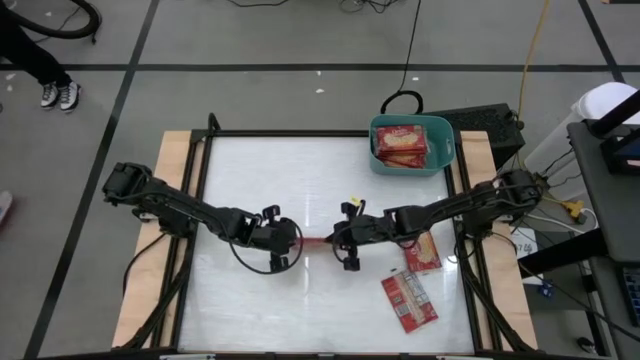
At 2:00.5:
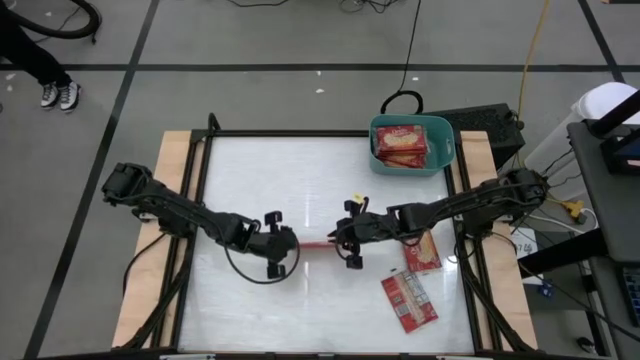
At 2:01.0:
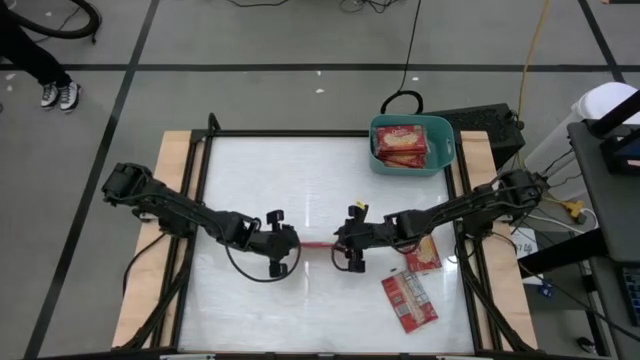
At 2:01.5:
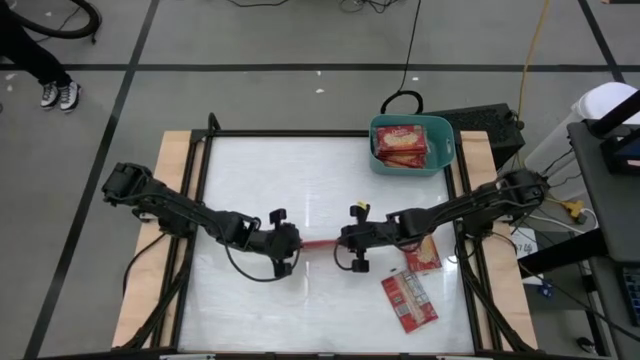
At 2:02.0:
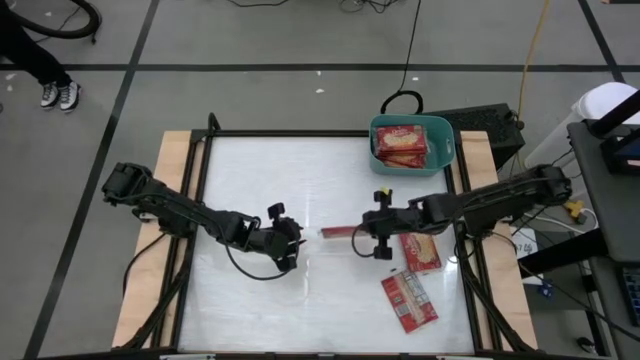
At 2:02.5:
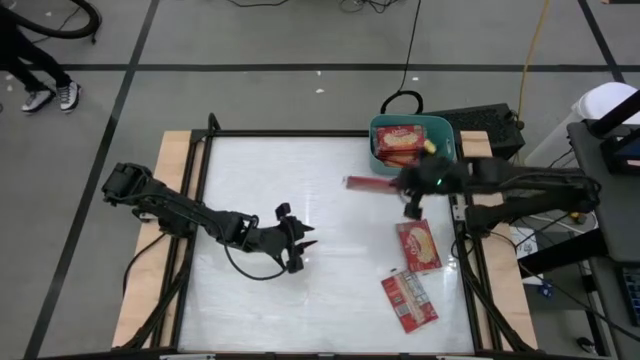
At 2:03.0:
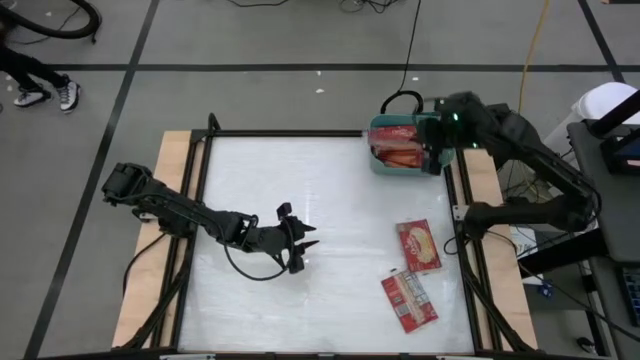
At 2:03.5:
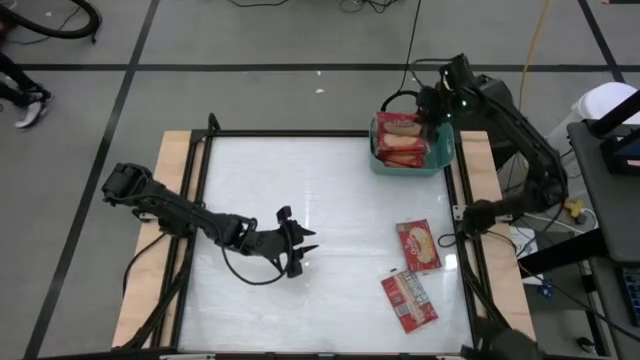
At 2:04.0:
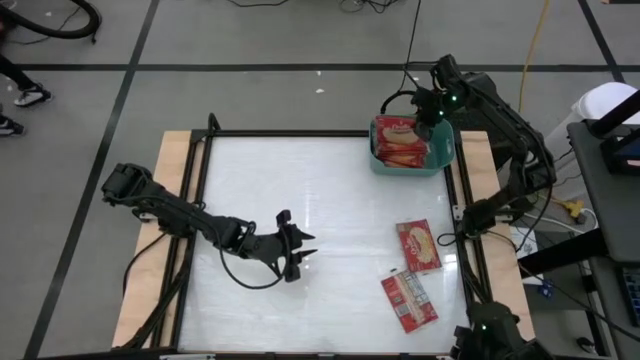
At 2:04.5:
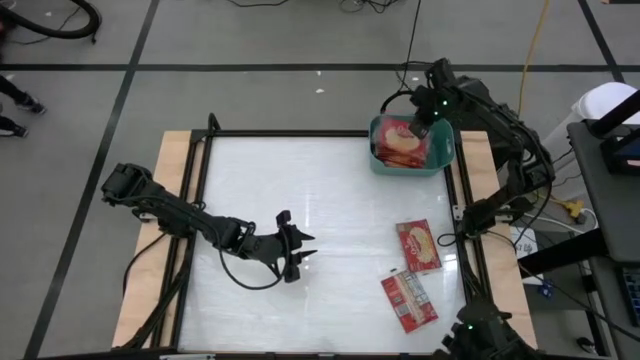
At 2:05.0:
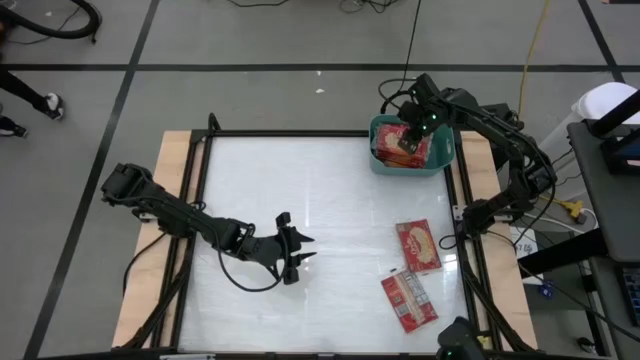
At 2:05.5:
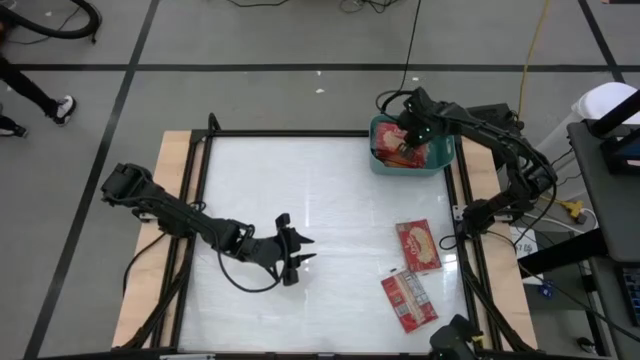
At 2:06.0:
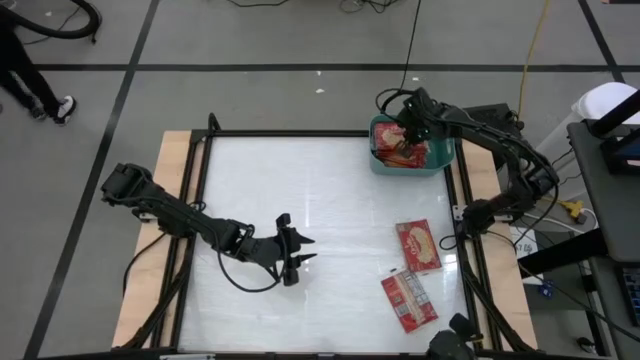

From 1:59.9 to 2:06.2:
Task: Sort popcorn bags into baskets
Put the red popcorn bag into the green bin

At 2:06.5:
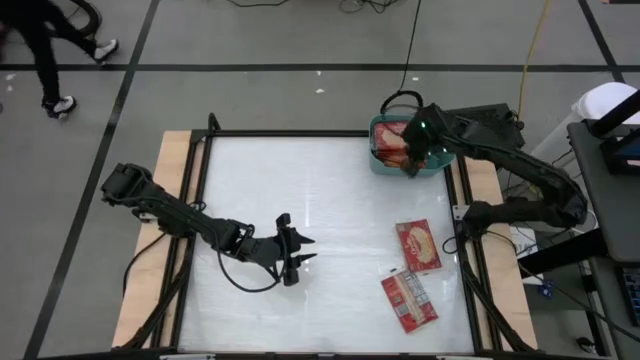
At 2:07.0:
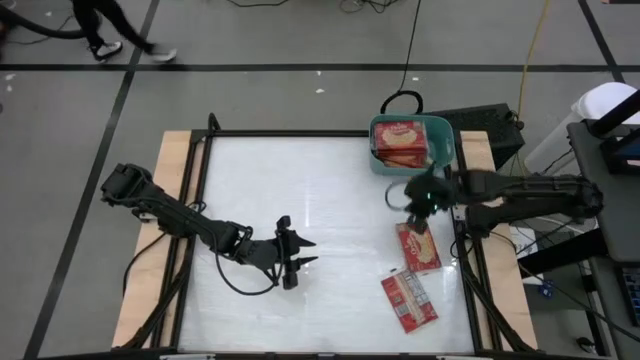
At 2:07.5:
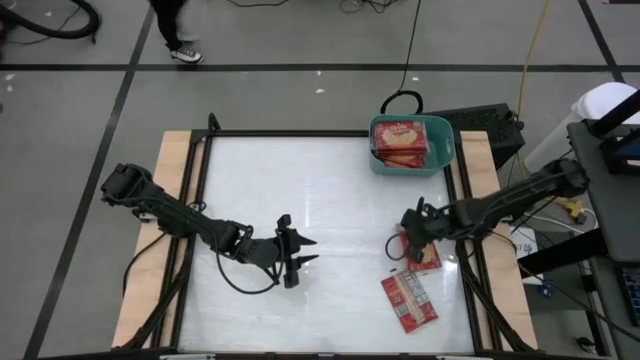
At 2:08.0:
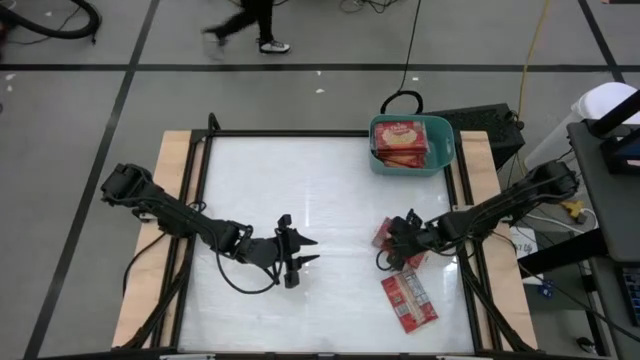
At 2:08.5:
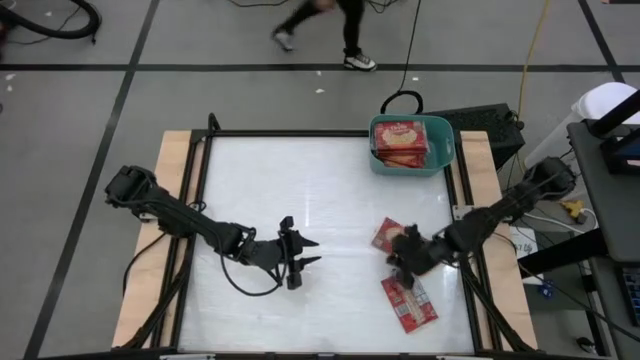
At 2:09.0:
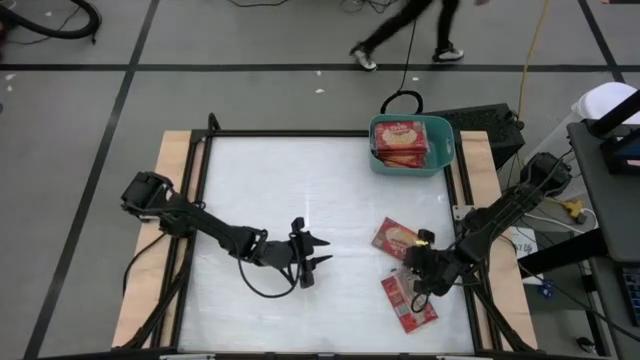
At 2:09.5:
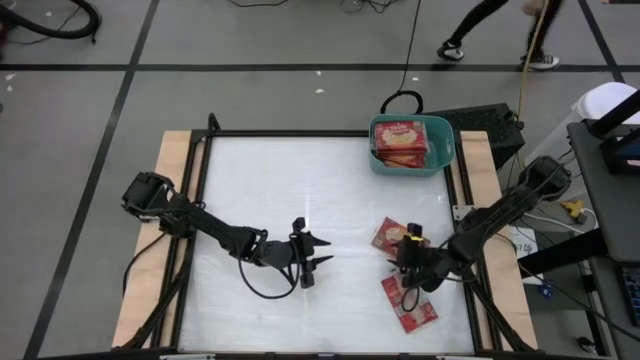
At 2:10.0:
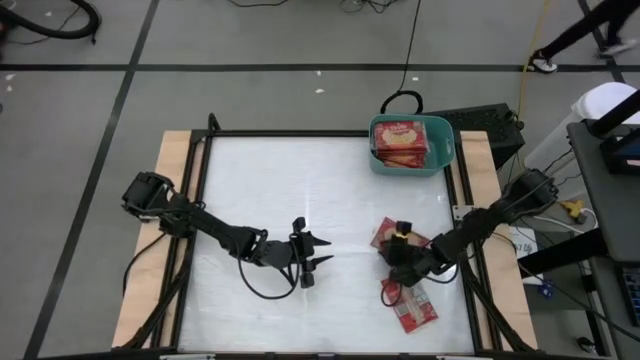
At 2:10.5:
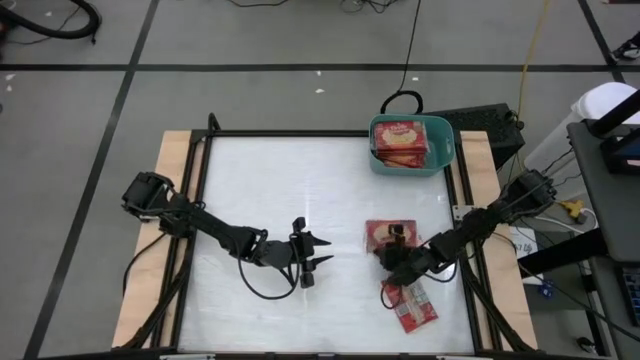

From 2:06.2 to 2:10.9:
Put the red popcorn bag into the green bin

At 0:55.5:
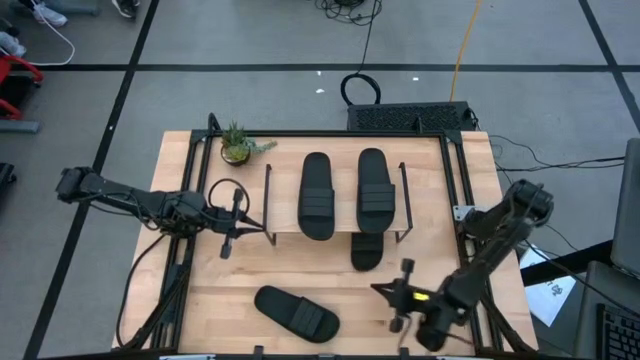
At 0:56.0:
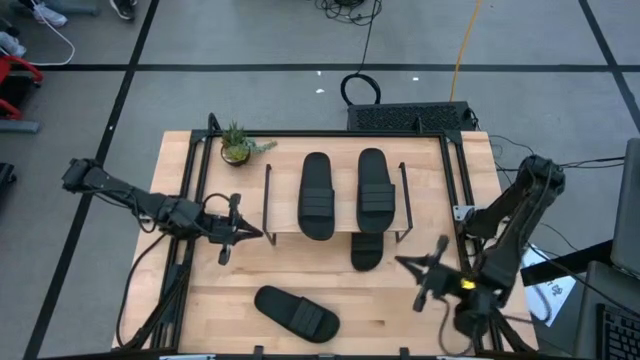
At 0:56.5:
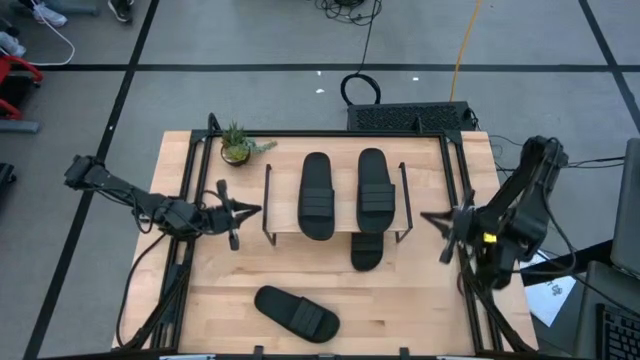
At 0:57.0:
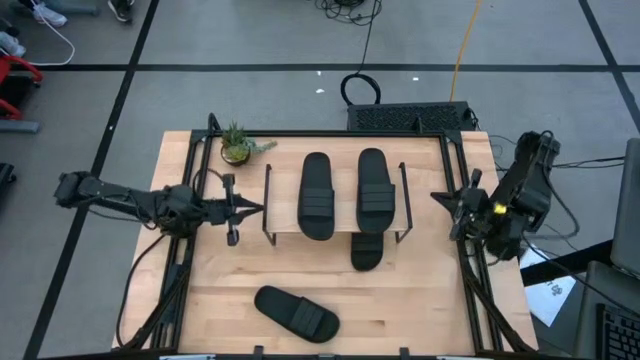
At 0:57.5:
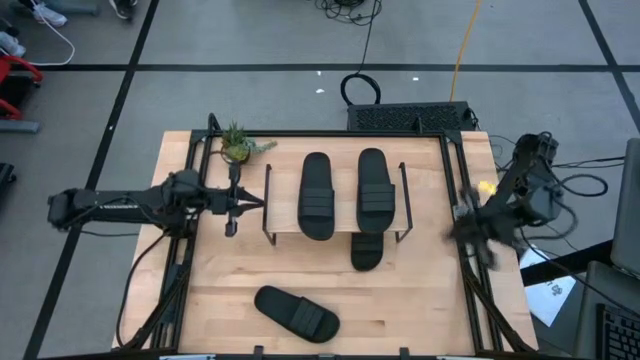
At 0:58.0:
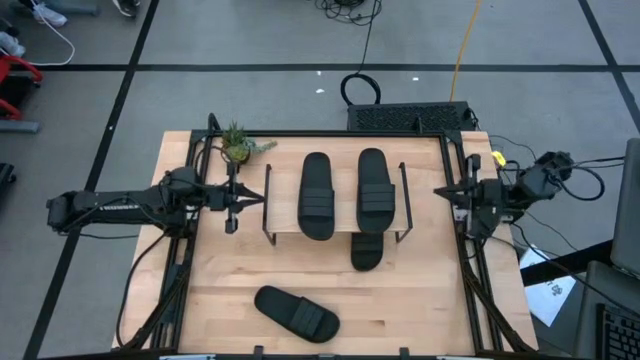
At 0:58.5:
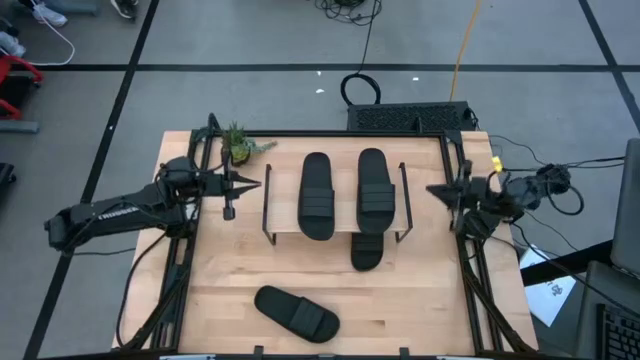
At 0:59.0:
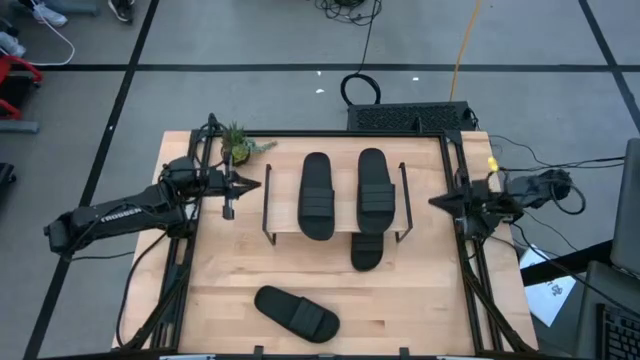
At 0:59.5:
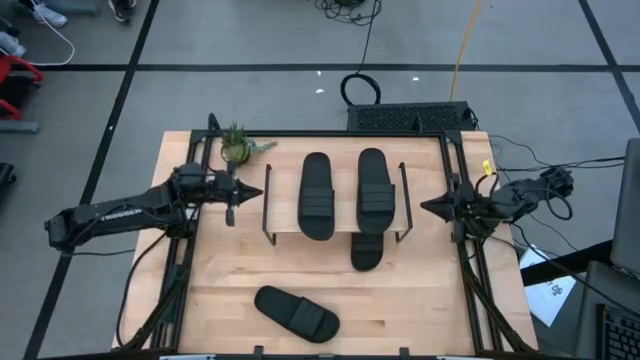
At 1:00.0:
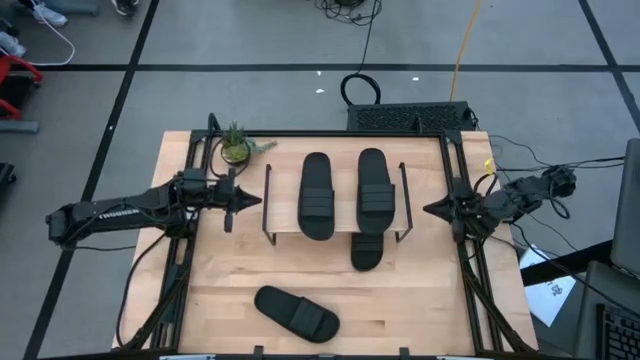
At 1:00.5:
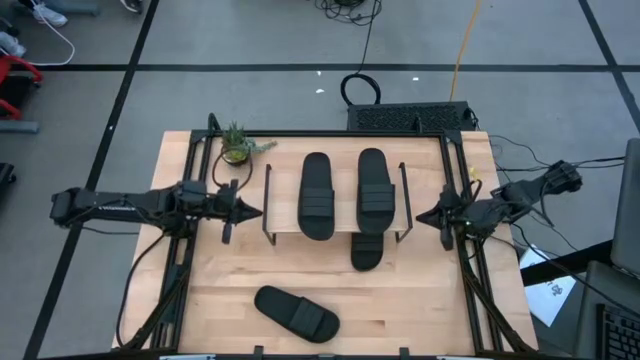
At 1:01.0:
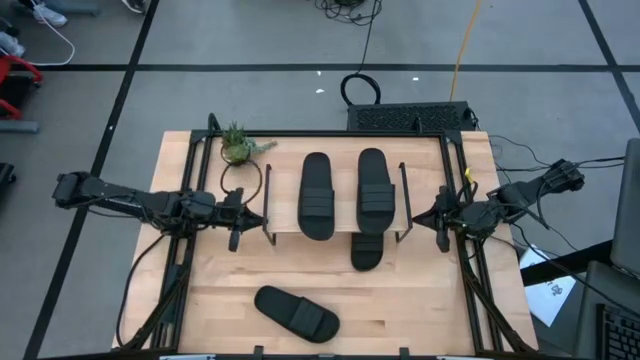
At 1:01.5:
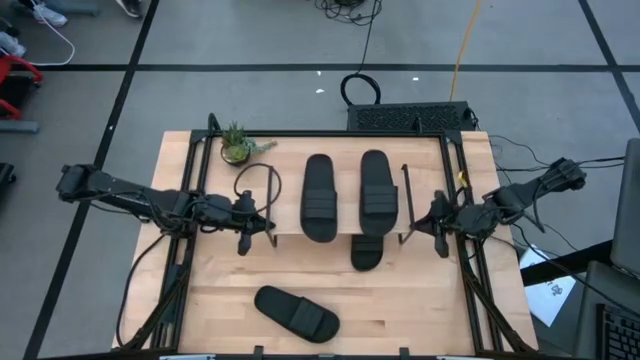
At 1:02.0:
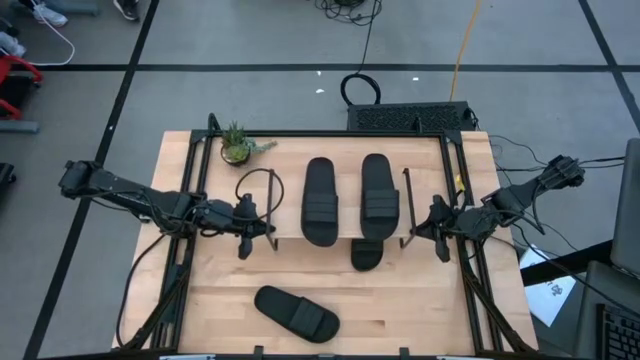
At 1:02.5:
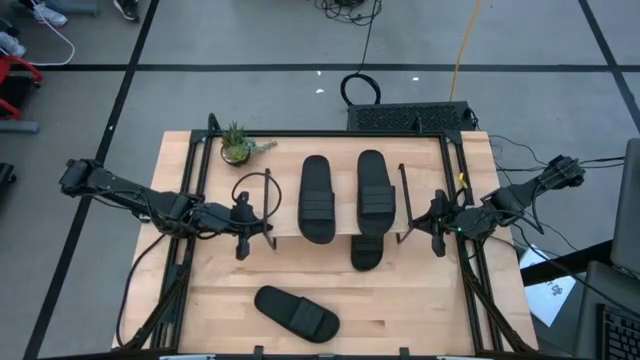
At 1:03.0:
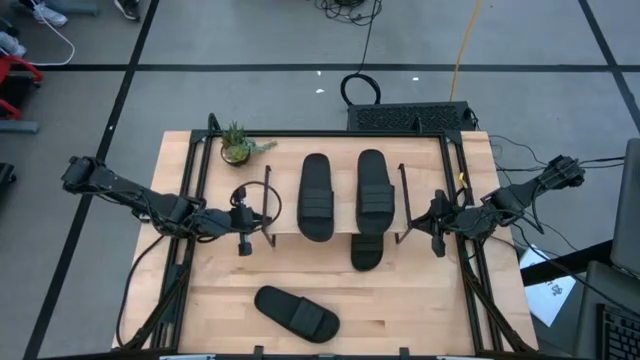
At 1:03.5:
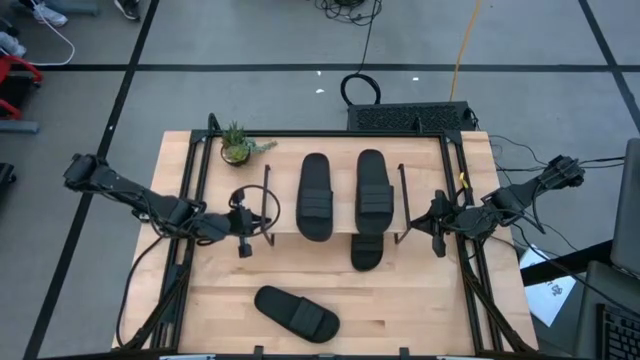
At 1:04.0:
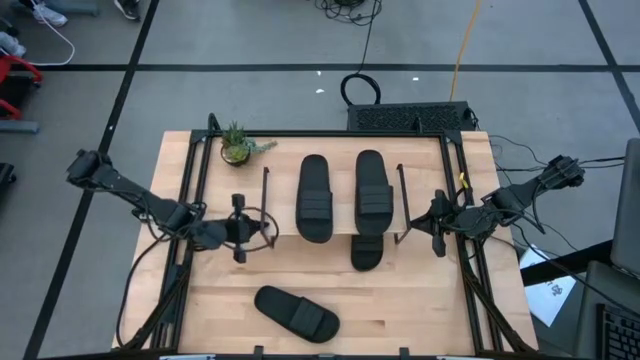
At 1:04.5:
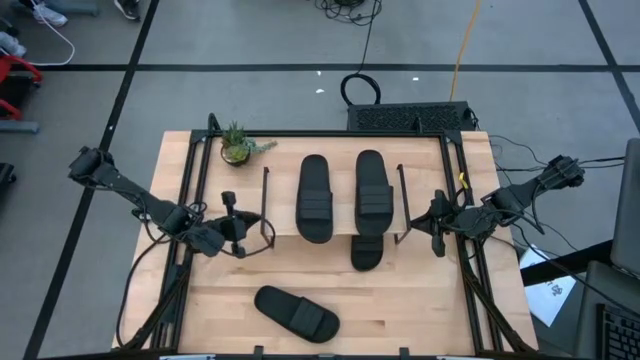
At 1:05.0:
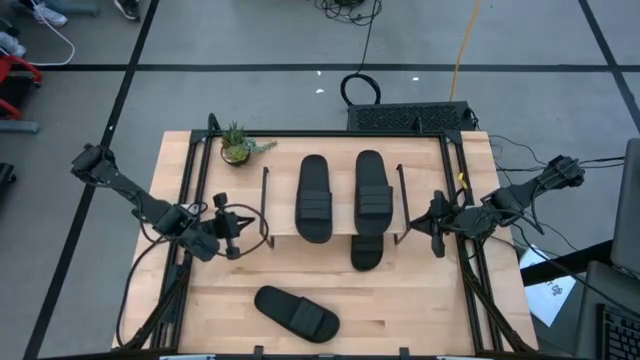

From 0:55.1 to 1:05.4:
Task: Pick and place slides into the shelf
Adjust the shelf
